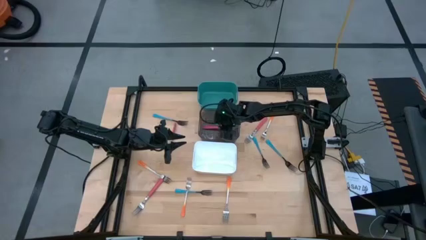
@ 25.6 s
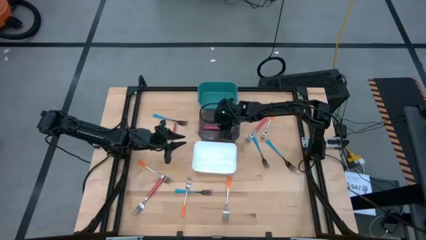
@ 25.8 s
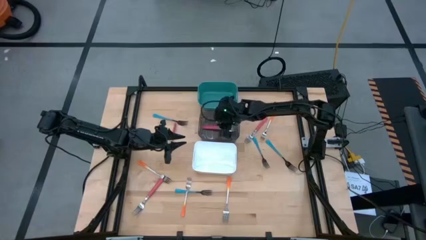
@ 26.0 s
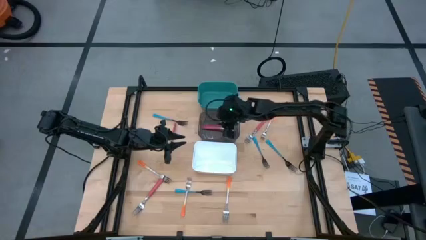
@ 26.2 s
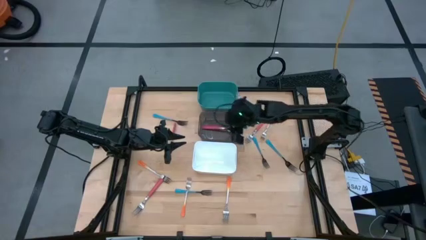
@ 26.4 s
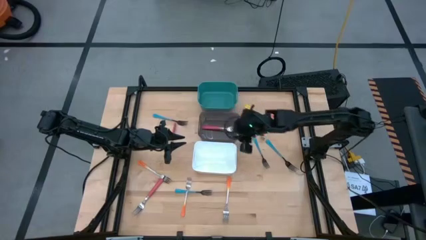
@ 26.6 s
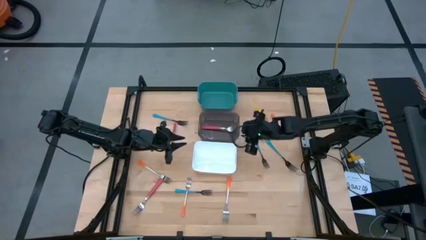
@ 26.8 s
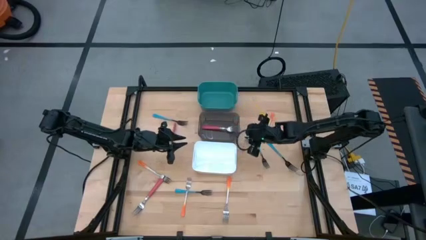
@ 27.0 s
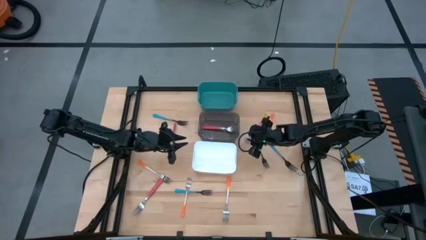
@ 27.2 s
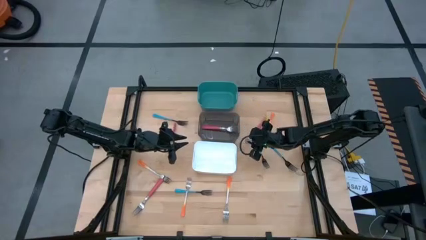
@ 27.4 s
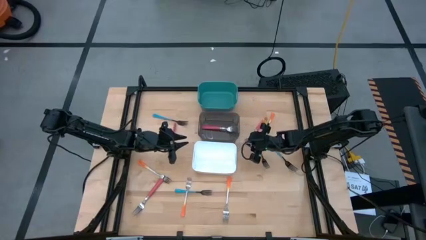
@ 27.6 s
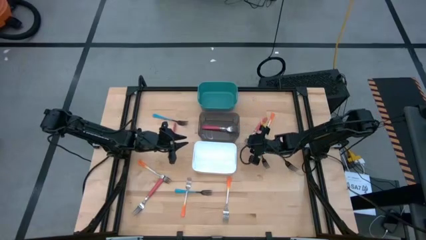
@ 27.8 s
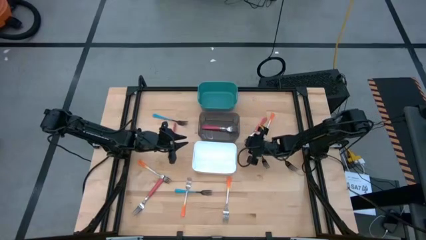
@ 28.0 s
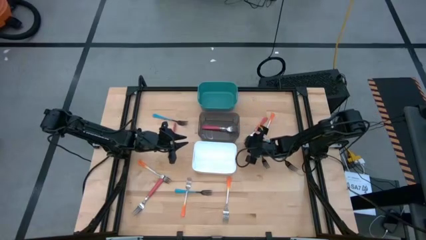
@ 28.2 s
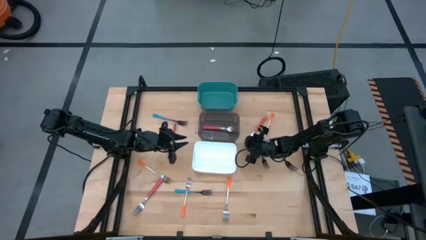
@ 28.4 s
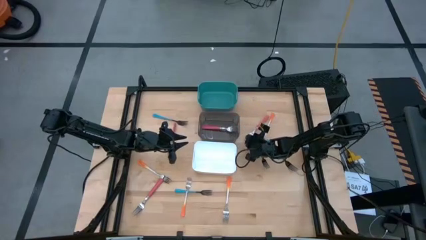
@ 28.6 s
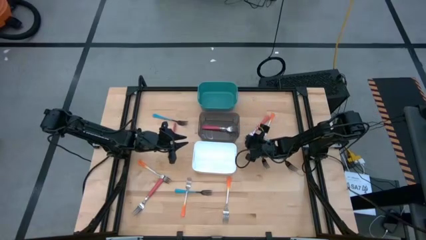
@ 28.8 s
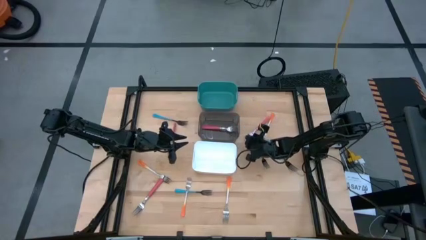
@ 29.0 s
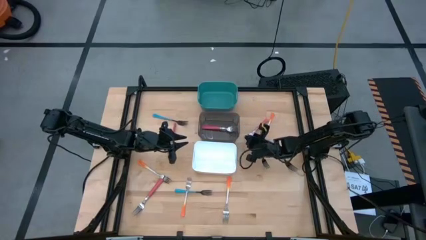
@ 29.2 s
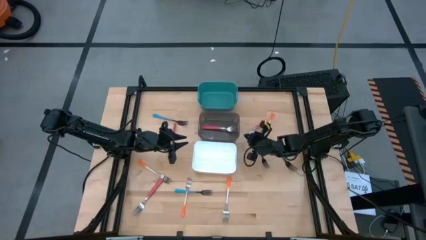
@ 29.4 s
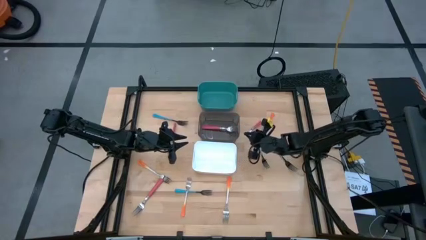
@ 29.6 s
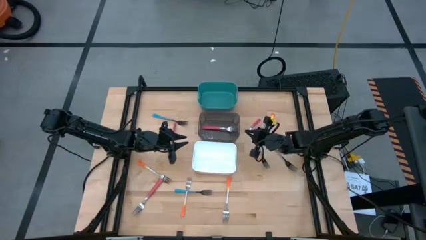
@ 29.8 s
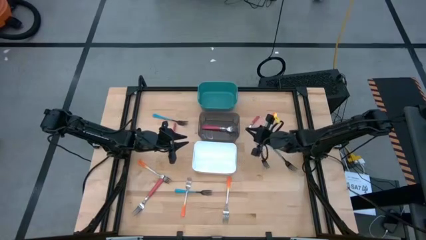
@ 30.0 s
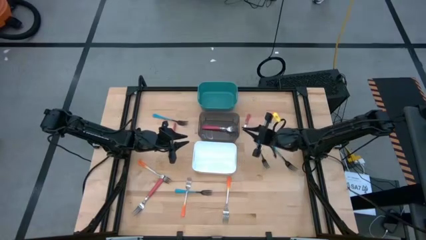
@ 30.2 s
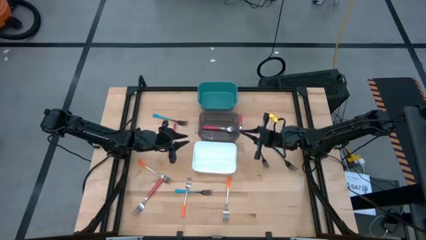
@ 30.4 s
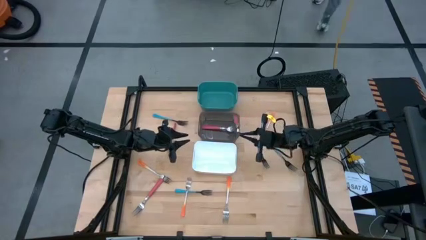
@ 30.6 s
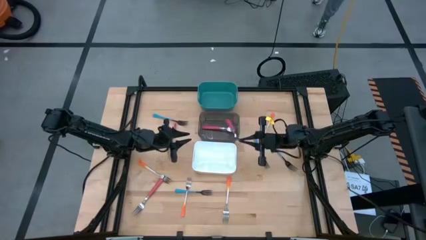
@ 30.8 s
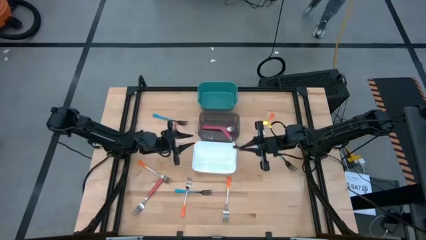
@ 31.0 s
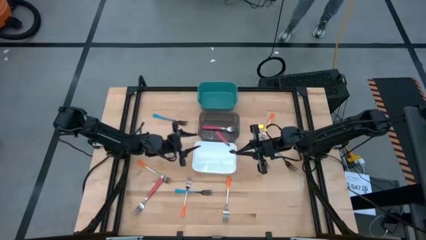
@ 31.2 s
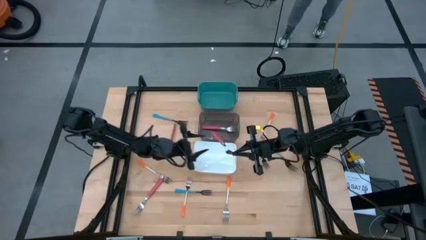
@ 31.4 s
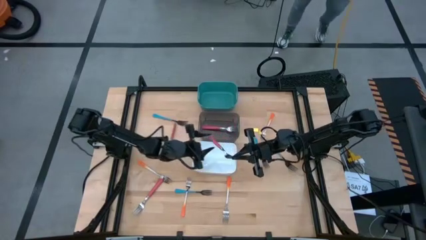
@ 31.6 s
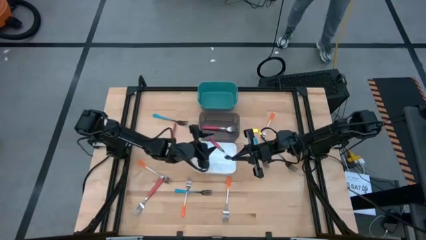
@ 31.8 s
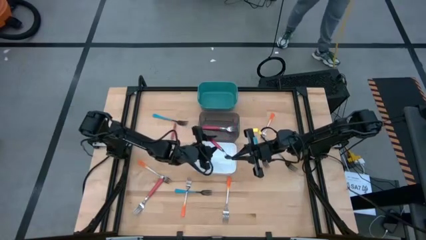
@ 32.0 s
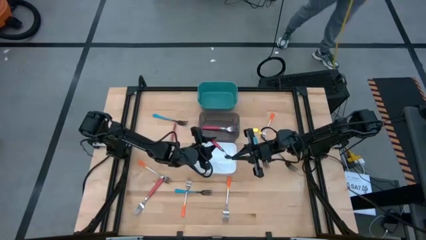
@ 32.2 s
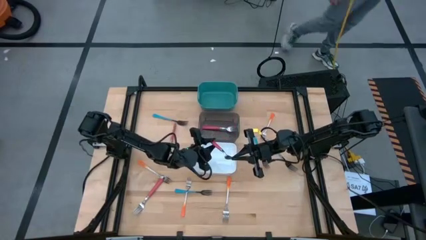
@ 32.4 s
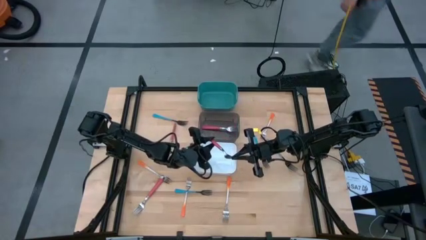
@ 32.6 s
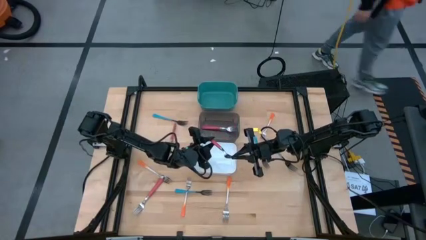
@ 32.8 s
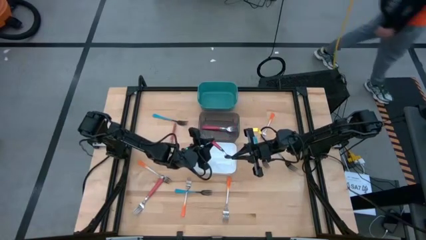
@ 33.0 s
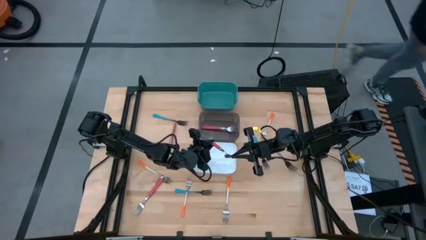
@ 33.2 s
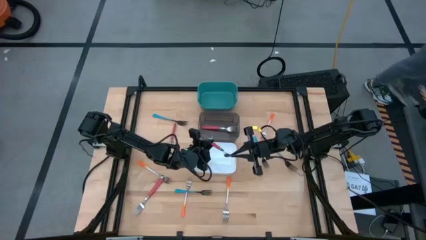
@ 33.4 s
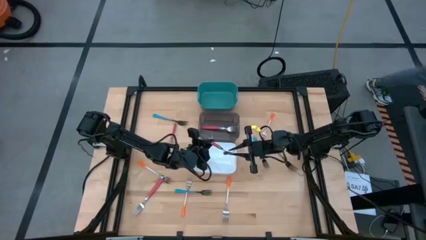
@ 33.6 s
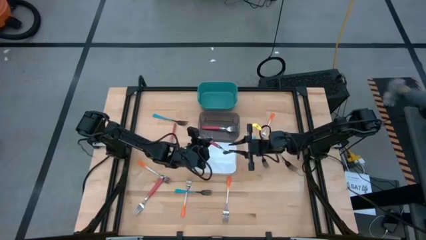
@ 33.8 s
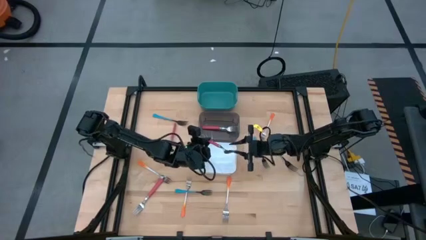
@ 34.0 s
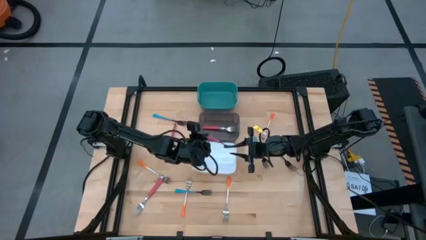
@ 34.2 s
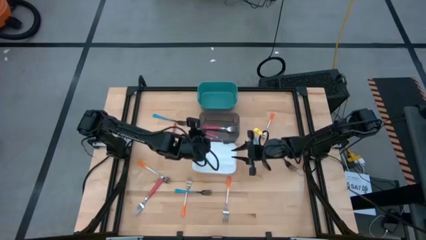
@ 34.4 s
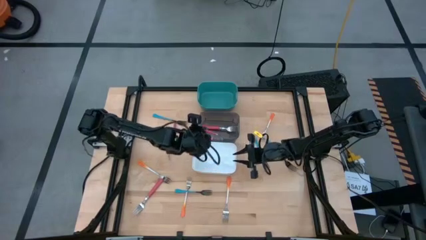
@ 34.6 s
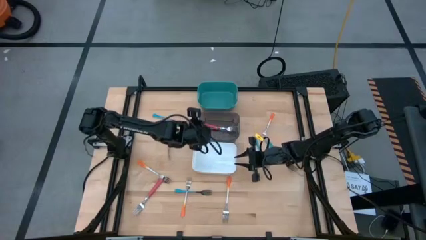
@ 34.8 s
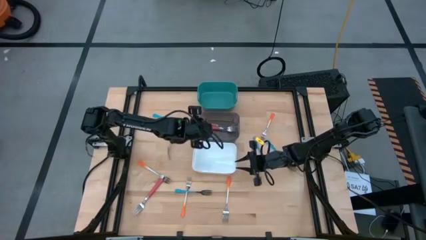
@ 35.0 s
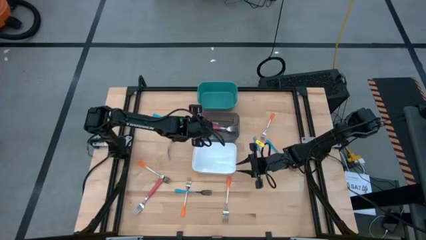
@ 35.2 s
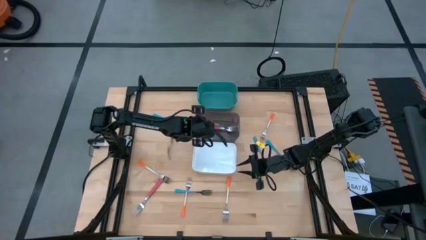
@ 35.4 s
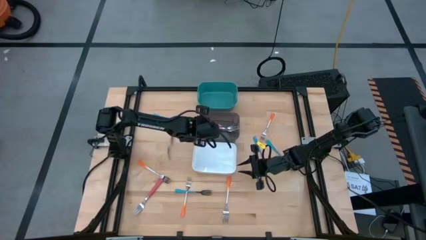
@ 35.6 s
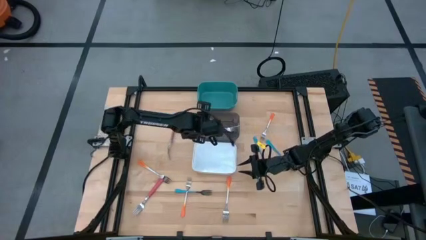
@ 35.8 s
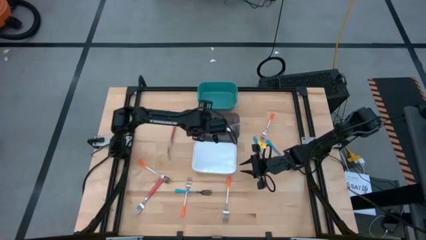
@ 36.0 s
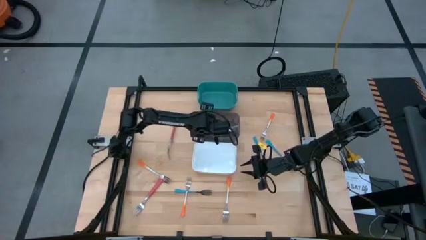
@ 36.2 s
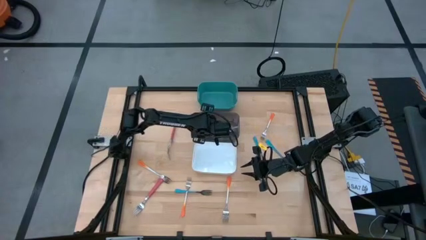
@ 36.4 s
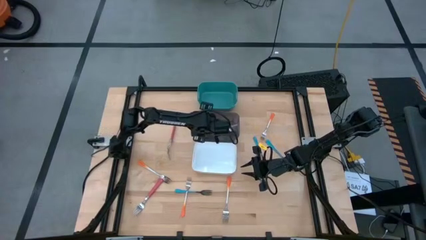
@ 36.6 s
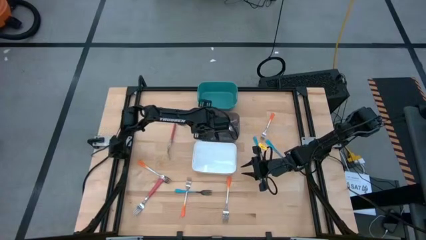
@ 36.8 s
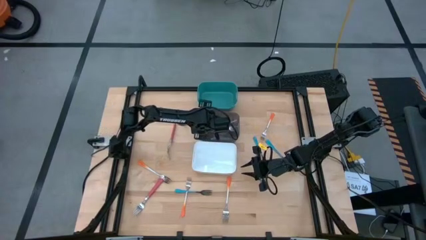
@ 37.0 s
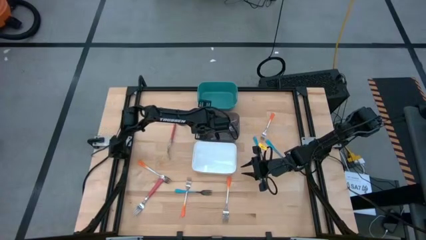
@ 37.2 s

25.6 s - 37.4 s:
Task: Sort silverware by color (type)
Put the top right pink fork into the black bin
